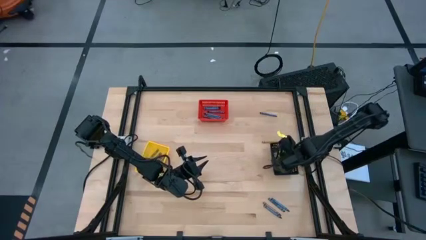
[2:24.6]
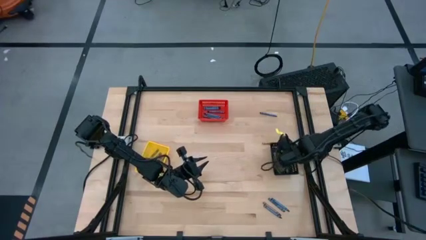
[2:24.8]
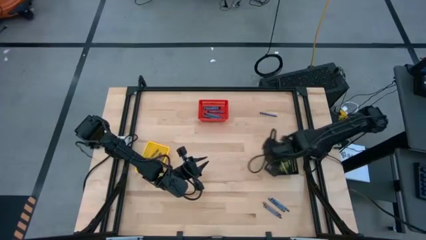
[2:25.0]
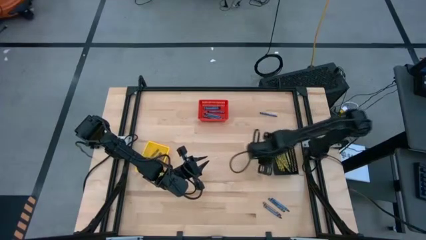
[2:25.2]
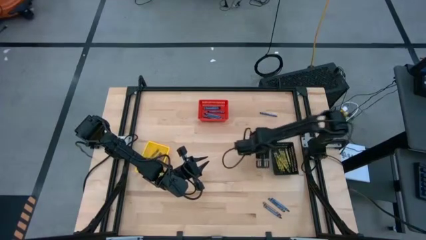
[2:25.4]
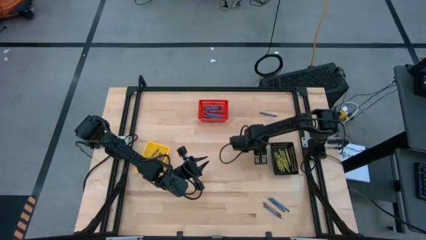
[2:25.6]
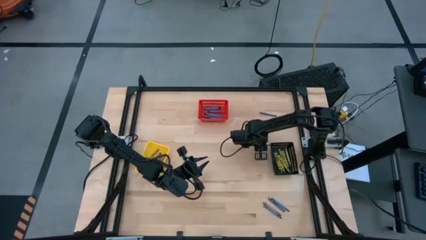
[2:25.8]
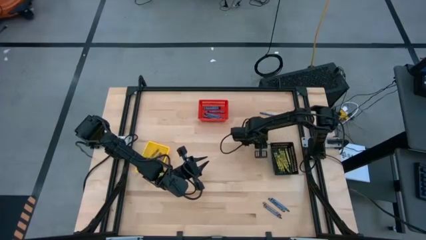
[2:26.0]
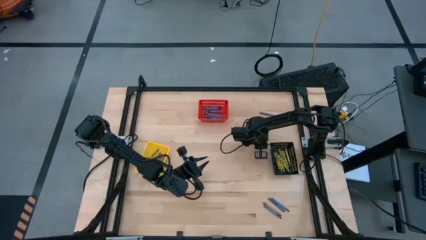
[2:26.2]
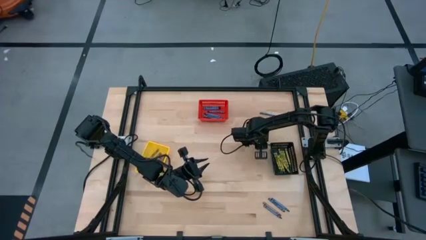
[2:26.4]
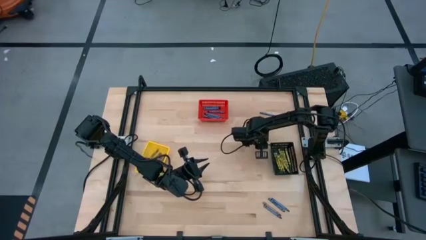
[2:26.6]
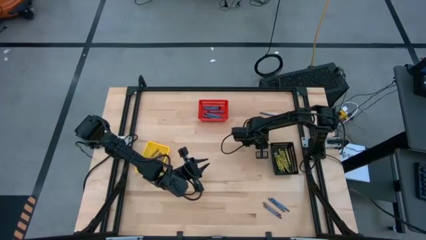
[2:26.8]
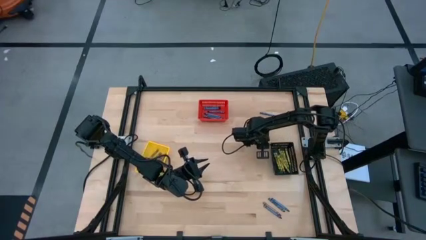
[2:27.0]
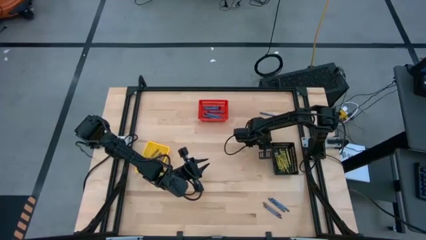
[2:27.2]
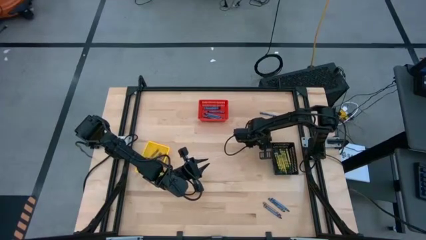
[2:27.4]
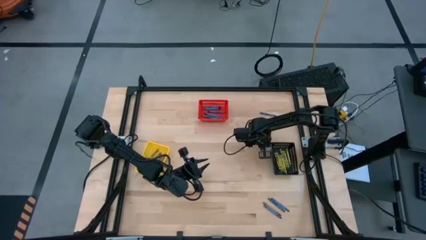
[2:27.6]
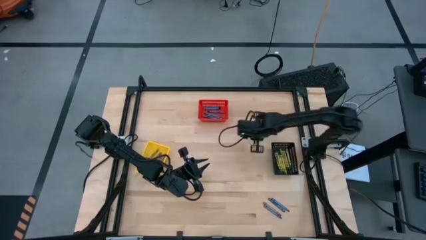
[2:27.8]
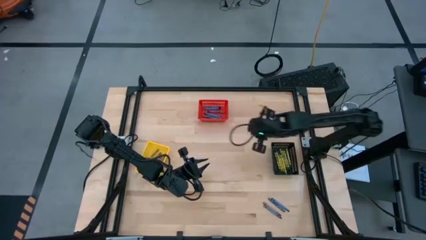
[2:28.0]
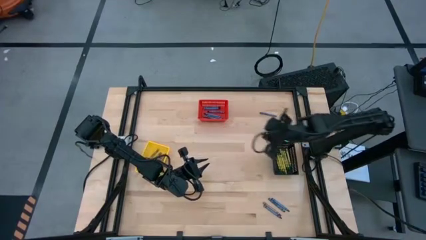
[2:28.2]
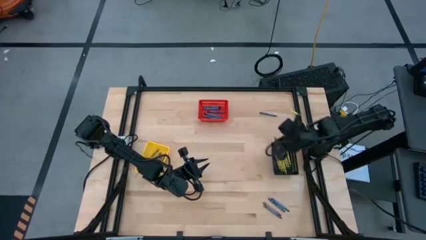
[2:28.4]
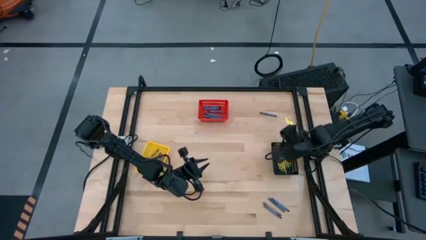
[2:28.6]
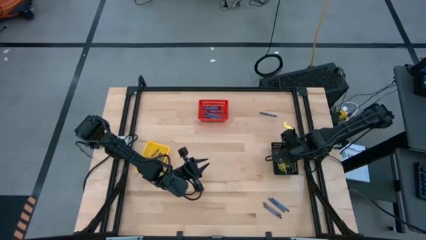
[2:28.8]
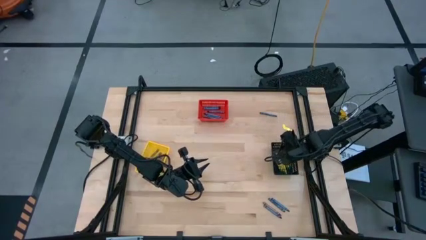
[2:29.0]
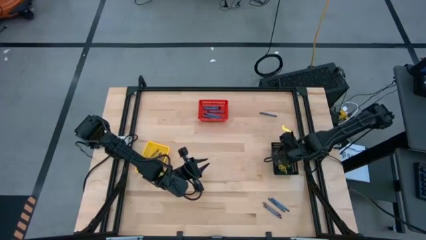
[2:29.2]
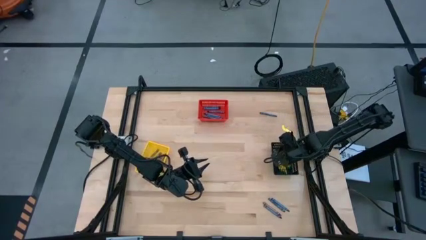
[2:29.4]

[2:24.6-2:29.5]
Task: Sort crayons
Put the green crayon into the black basket

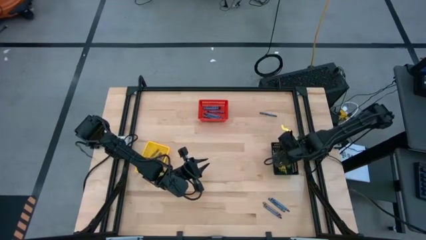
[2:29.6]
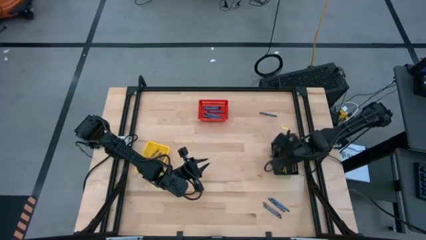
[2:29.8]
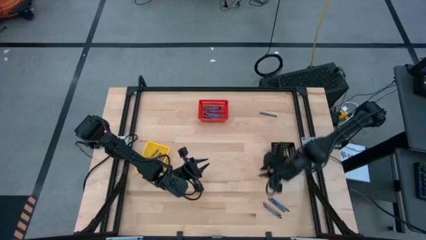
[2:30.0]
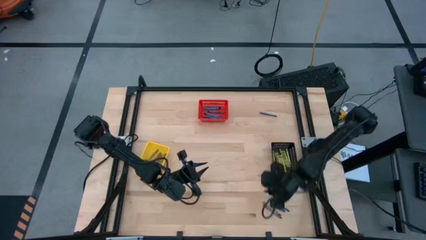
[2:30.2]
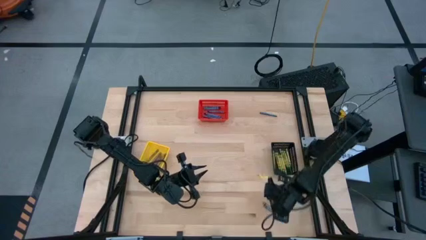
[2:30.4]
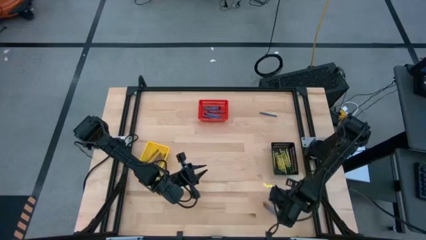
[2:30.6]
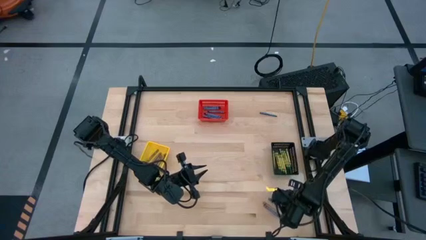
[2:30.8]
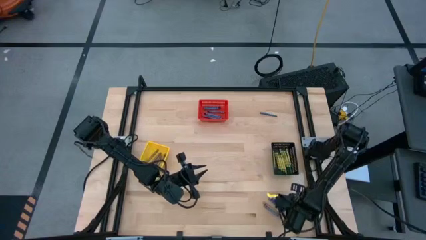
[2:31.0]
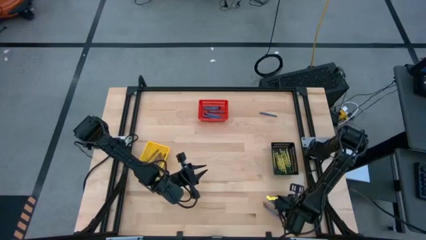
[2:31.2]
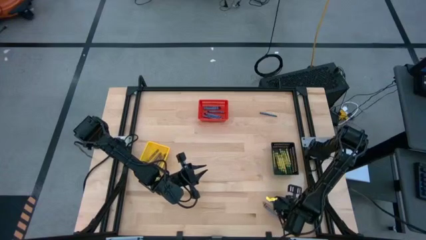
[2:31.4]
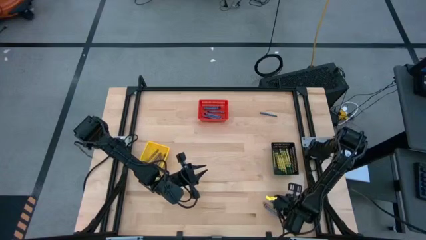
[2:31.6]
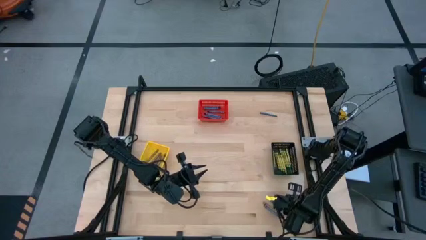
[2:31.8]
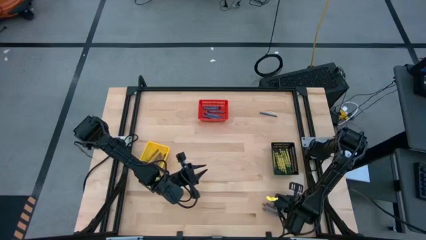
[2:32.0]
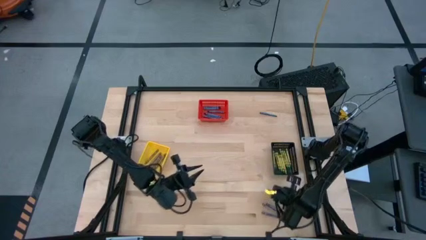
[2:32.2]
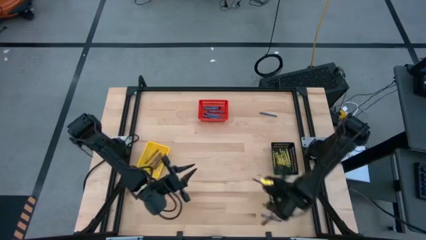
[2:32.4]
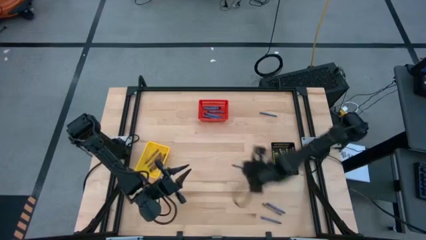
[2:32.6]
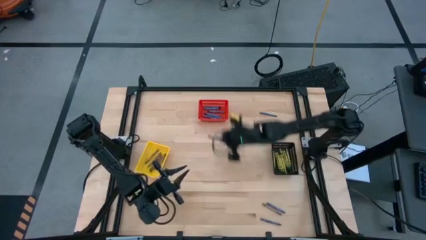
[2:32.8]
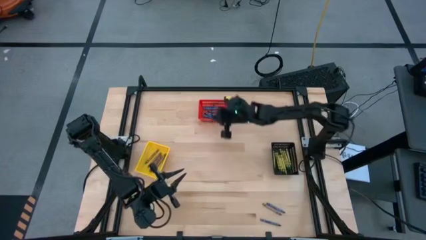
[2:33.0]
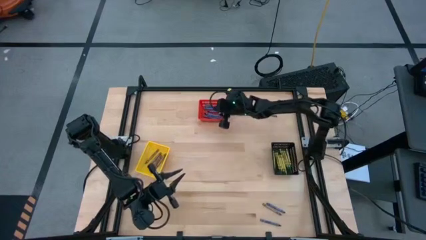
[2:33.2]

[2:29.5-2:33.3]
Put the blue crayon into the red basket

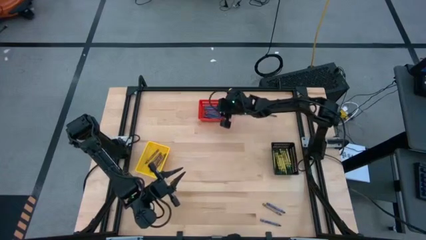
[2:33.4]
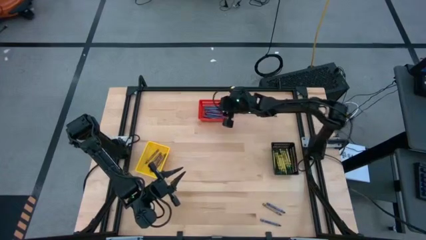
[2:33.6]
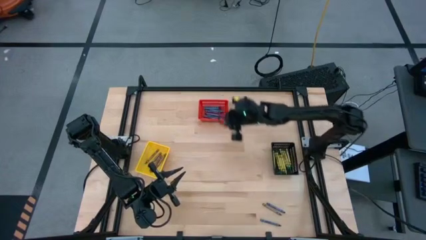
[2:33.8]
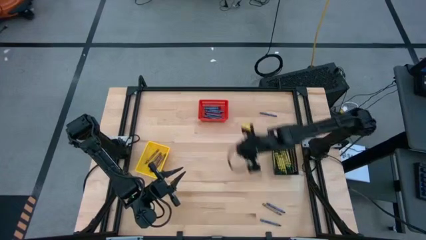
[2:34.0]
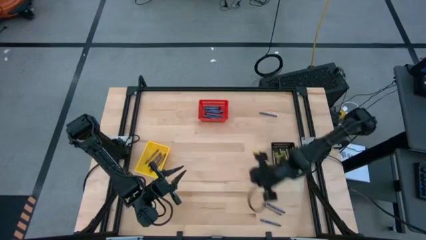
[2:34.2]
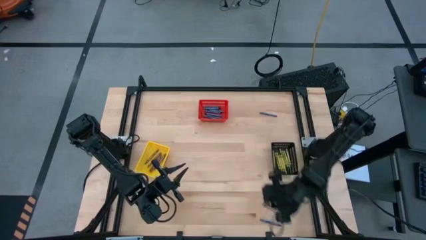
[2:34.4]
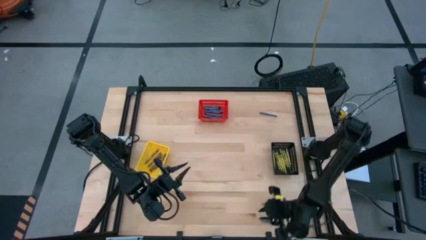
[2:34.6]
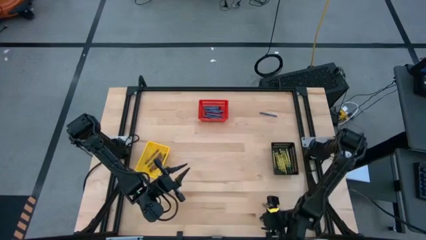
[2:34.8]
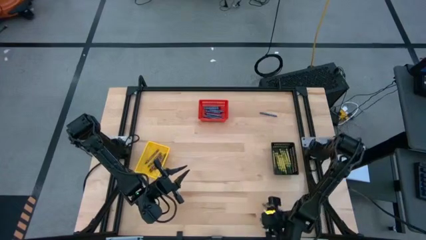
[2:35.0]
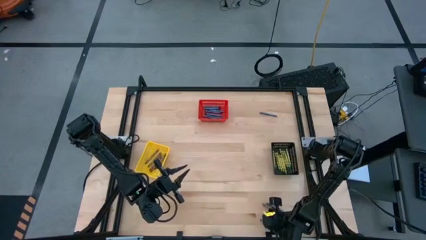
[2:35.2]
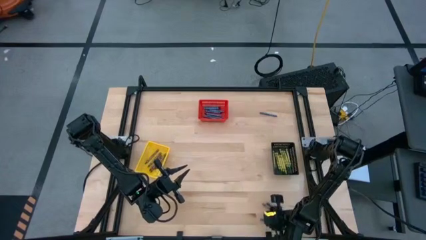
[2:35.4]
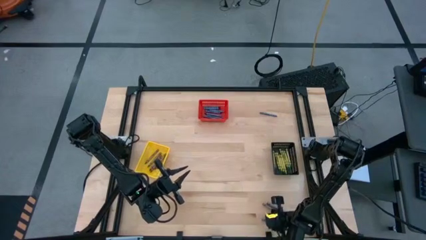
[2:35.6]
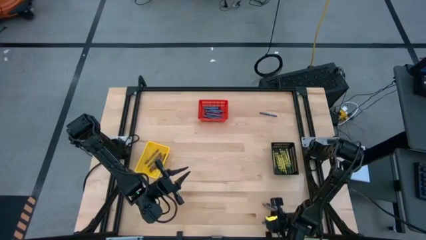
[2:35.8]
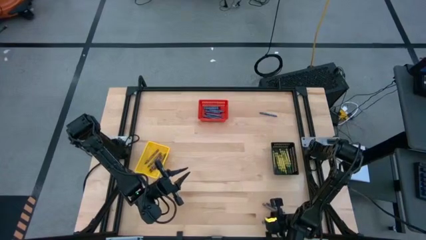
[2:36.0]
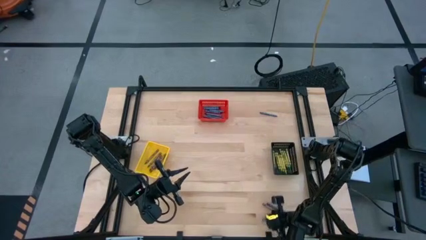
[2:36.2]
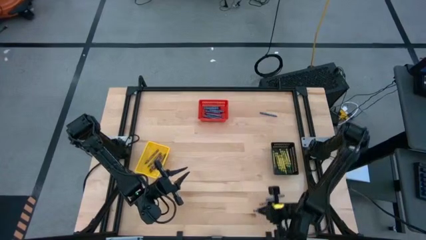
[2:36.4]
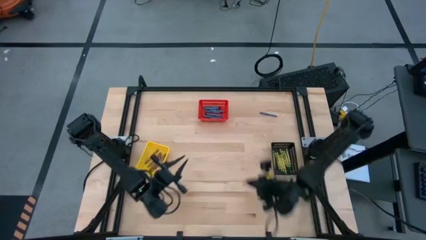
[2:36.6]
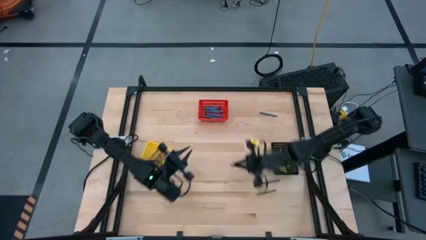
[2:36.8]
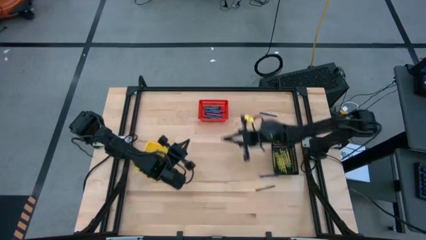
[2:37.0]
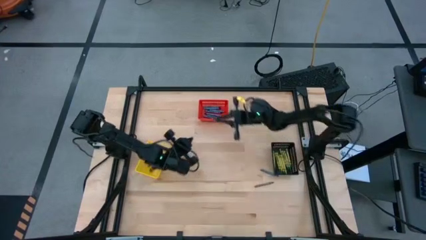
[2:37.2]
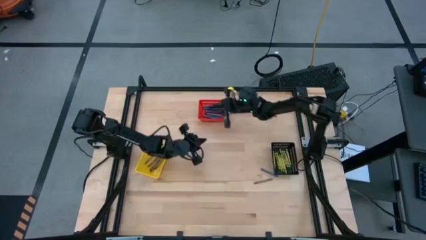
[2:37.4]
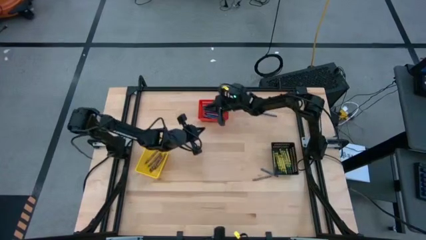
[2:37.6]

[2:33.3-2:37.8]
Put the blue crayon into the red basket

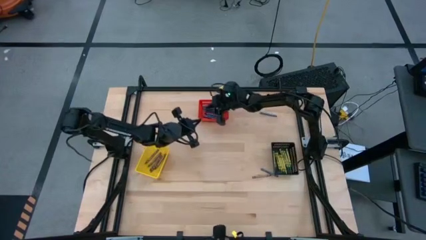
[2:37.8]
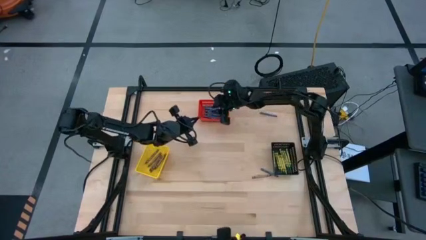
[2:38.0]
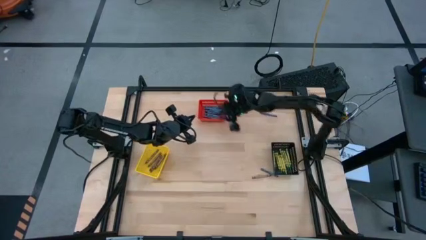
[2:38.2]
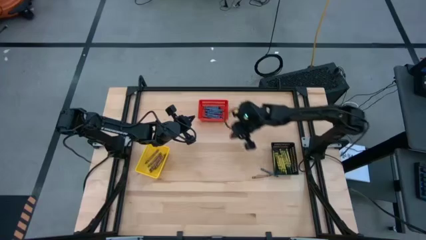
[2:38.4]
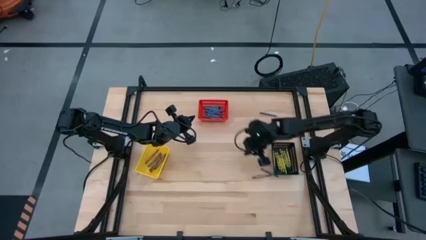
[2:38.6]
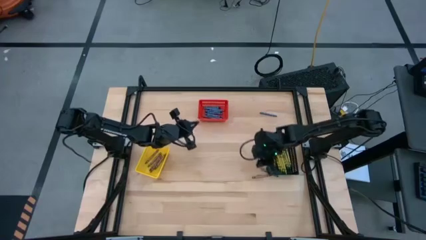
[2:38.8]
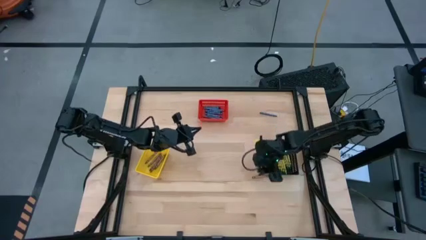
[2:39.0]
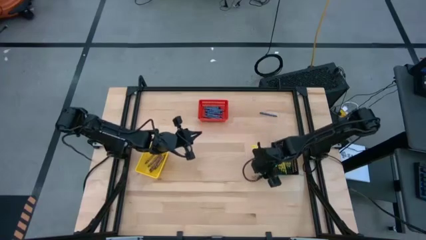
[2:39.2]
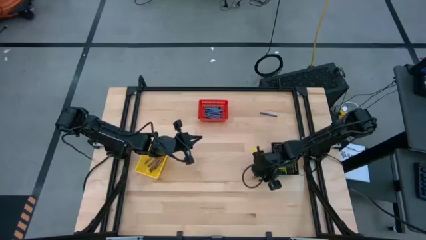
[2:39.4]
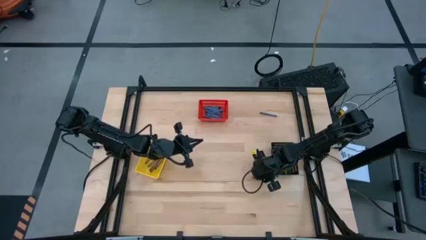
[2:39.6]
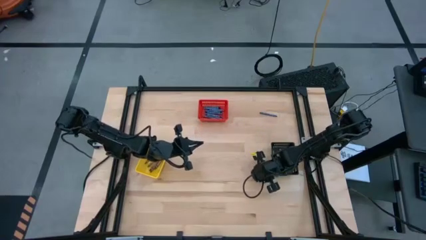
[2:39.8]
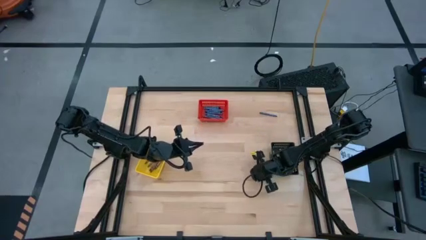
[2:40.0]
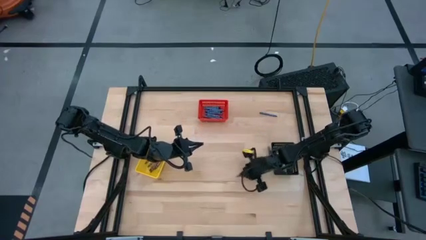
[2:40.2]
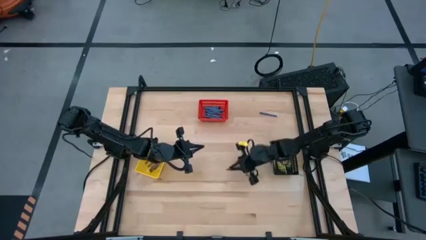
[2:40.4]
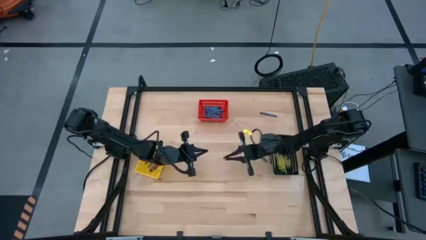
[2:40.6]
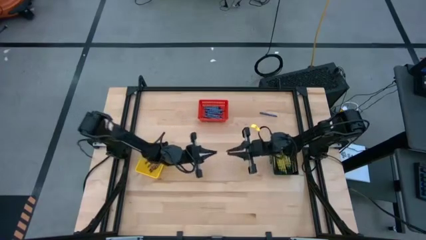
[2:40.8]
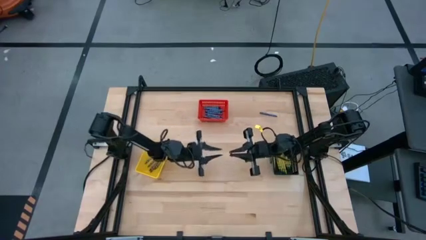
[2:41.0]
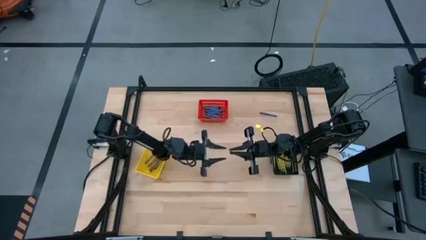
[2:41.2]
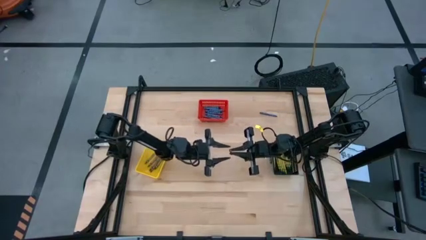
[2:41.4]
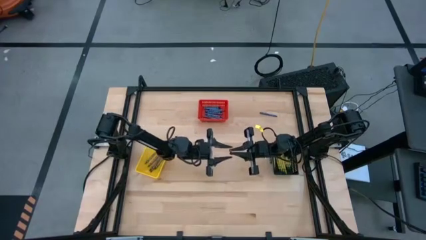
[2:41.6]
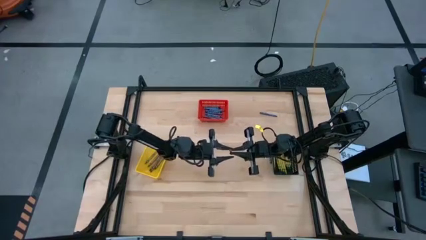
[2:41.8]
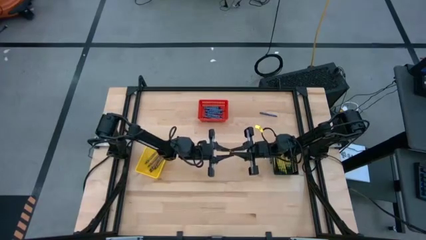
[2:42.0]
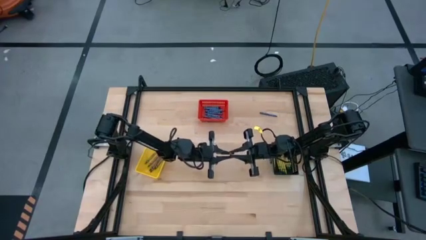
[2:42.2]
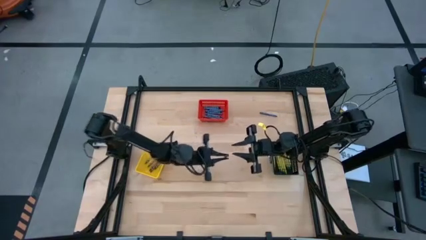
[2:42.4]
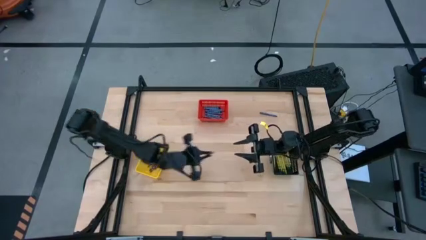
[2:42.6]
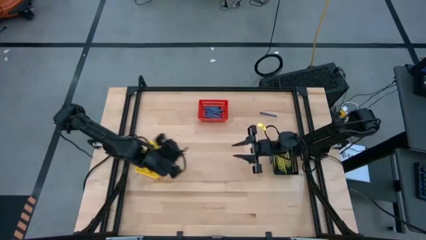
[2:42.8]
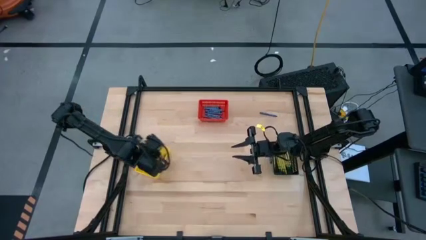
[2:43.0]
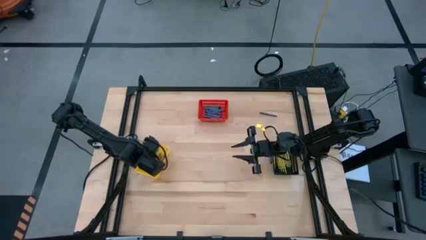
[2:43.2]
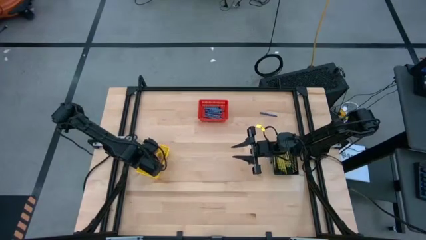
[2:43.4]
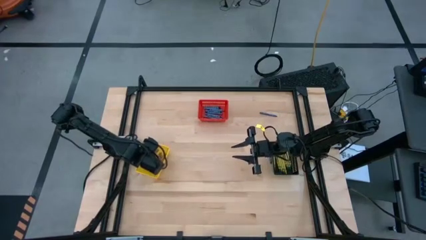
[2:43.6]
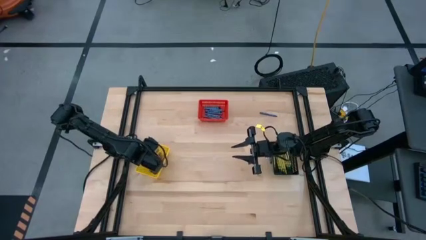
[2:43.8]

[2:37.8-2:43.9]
Put the brown crayon into the yellow basket
